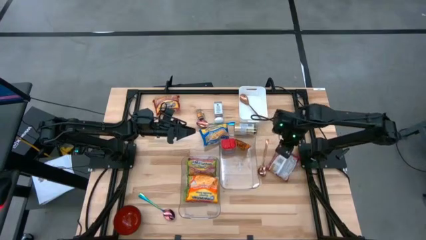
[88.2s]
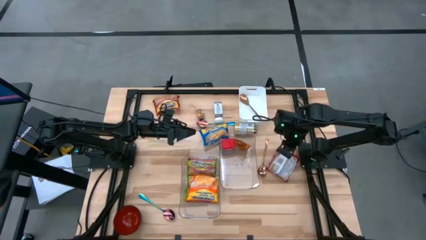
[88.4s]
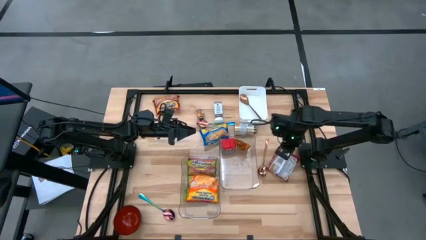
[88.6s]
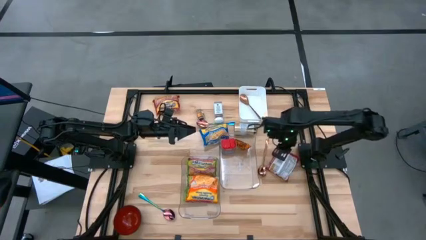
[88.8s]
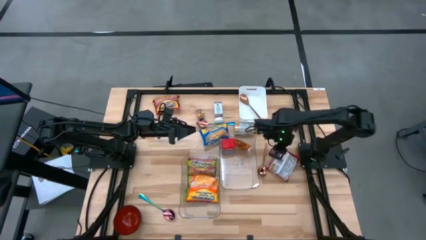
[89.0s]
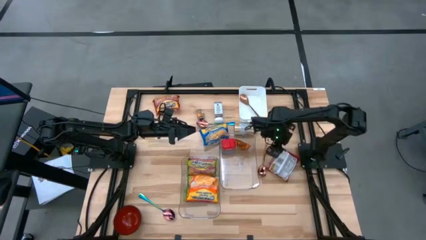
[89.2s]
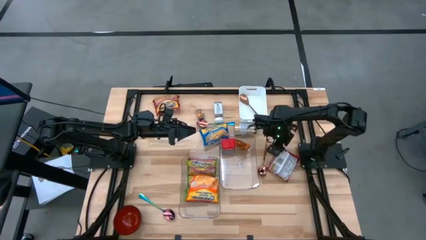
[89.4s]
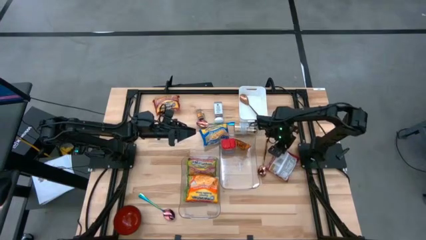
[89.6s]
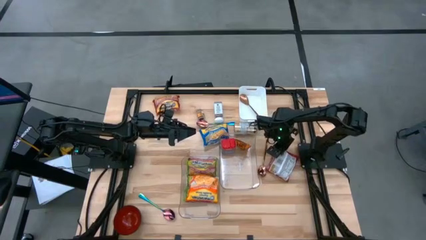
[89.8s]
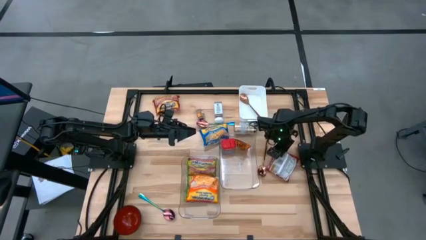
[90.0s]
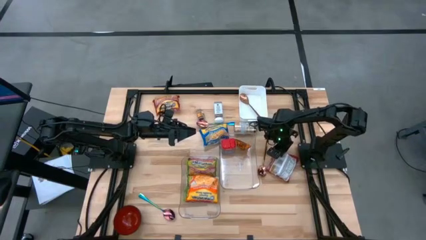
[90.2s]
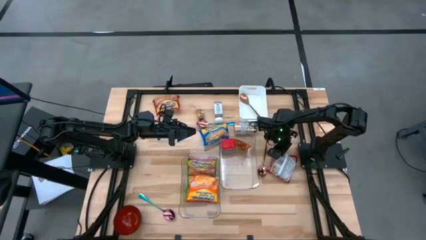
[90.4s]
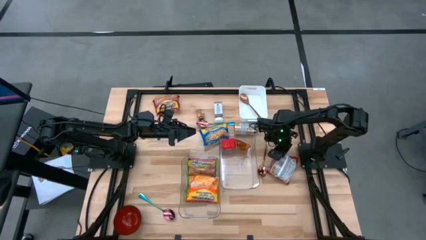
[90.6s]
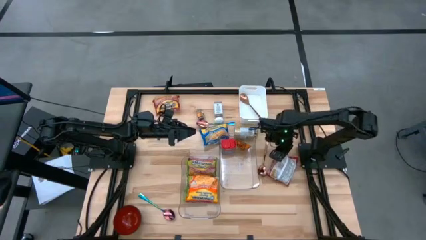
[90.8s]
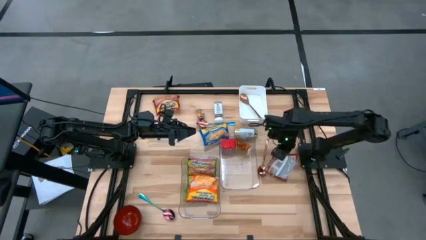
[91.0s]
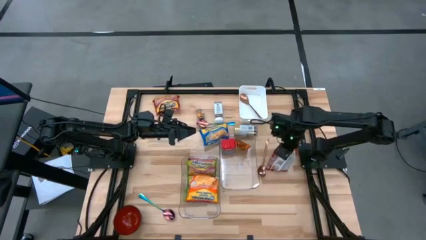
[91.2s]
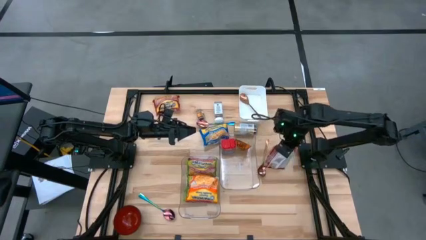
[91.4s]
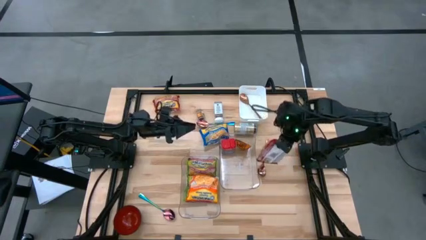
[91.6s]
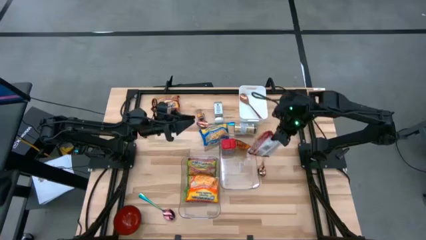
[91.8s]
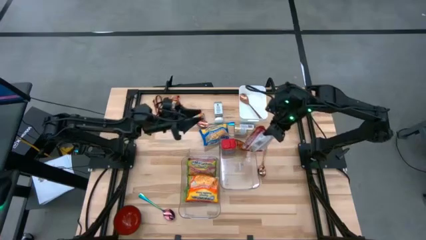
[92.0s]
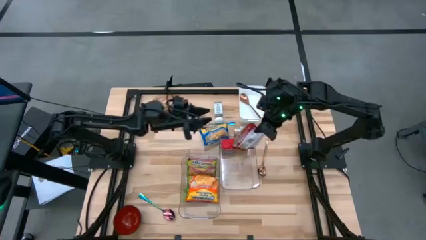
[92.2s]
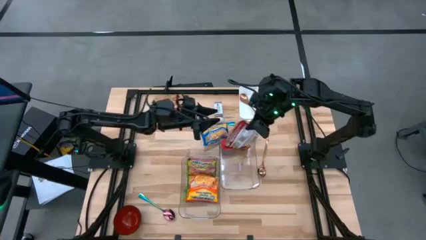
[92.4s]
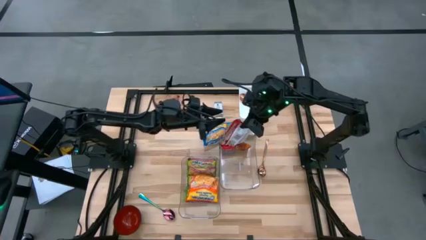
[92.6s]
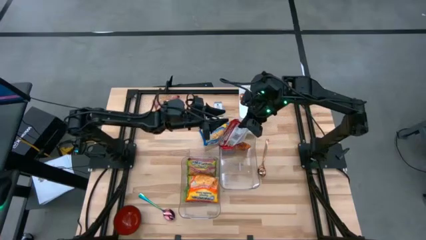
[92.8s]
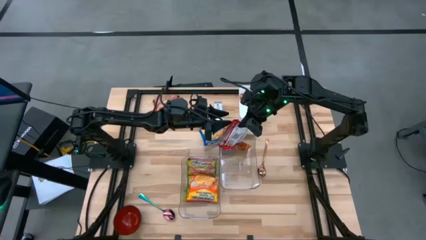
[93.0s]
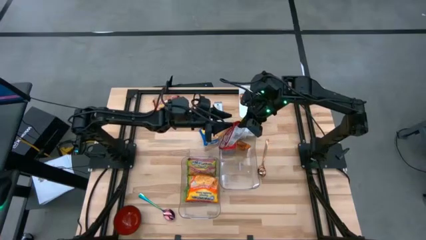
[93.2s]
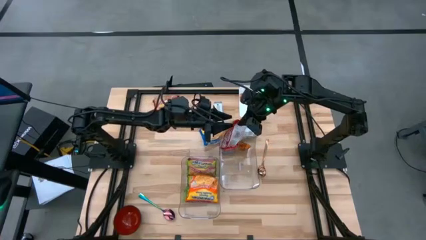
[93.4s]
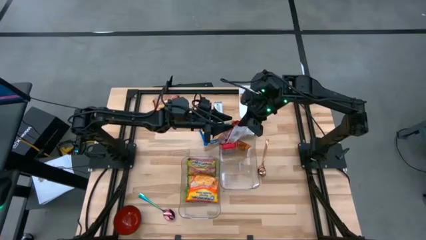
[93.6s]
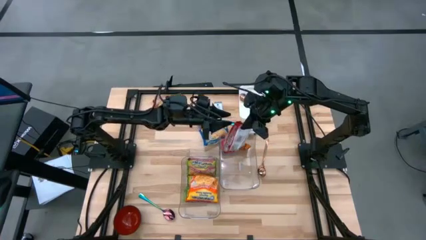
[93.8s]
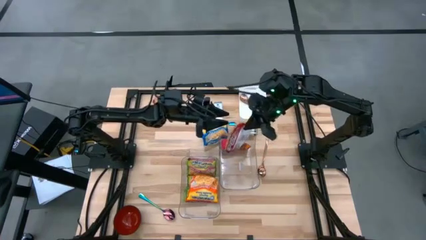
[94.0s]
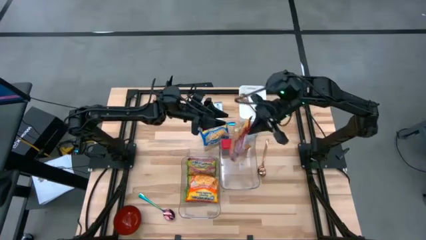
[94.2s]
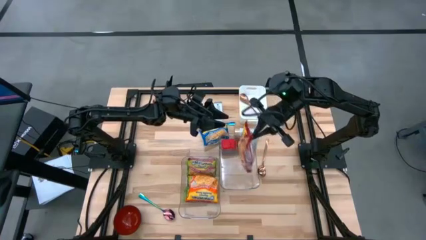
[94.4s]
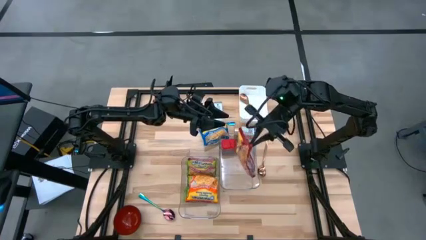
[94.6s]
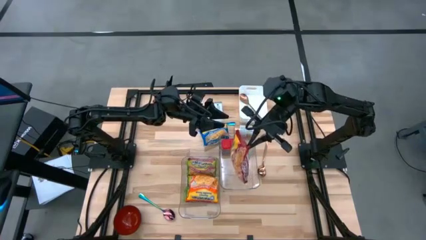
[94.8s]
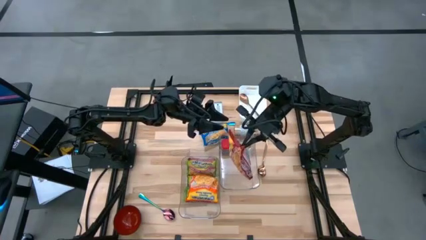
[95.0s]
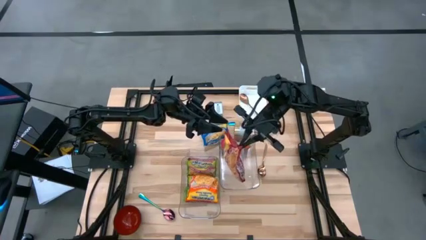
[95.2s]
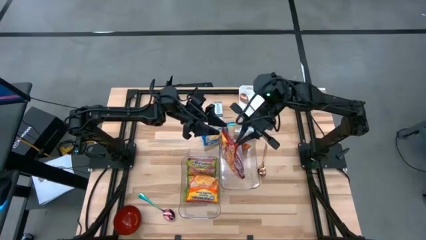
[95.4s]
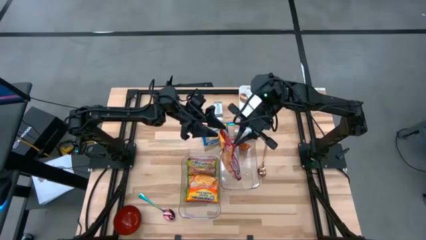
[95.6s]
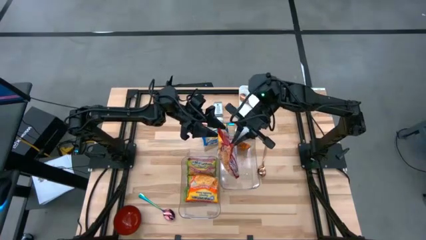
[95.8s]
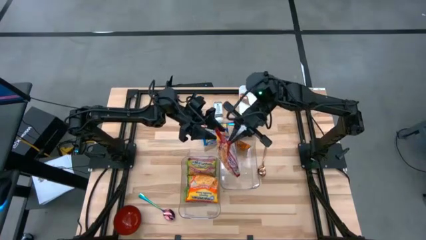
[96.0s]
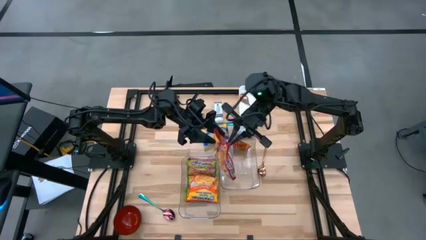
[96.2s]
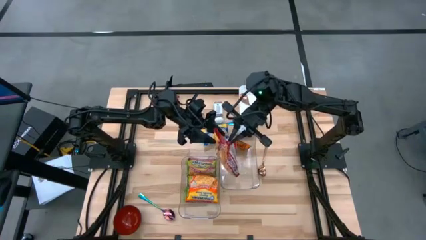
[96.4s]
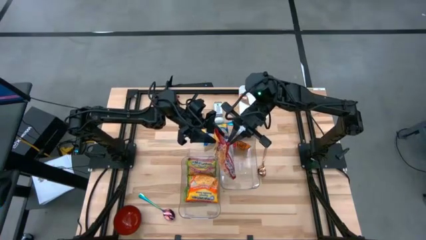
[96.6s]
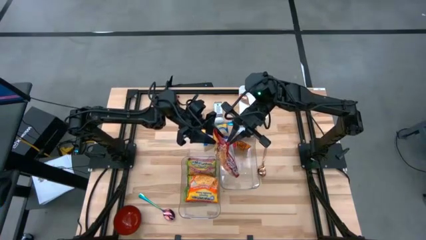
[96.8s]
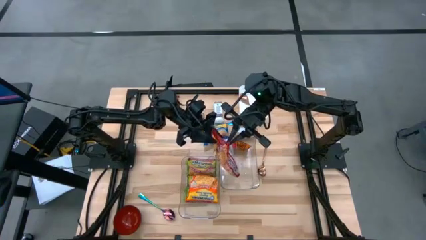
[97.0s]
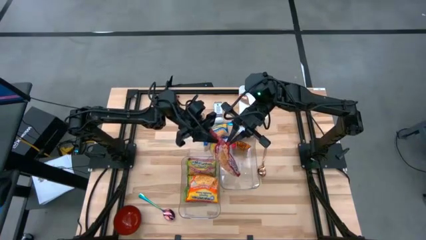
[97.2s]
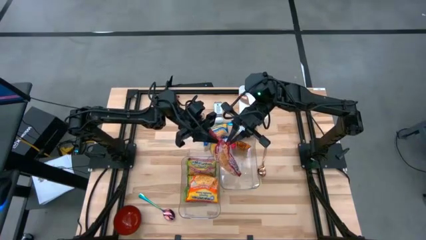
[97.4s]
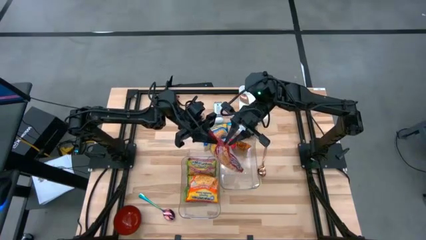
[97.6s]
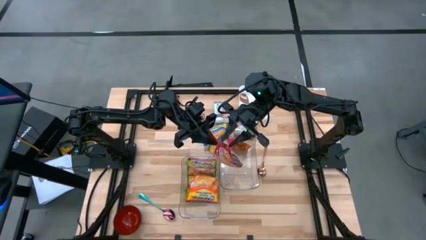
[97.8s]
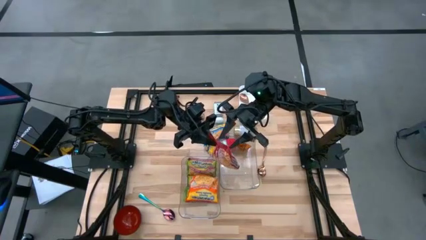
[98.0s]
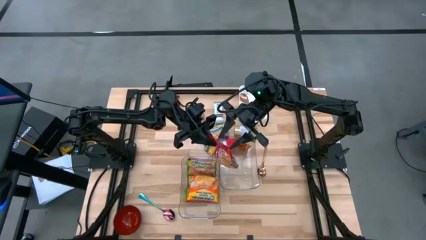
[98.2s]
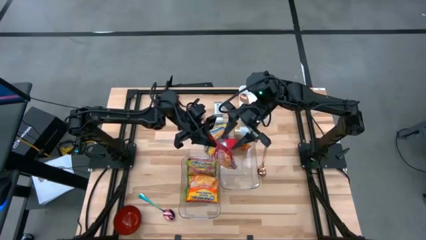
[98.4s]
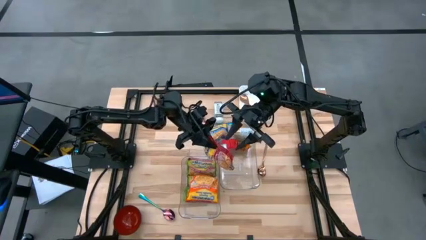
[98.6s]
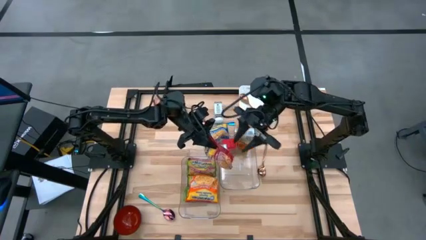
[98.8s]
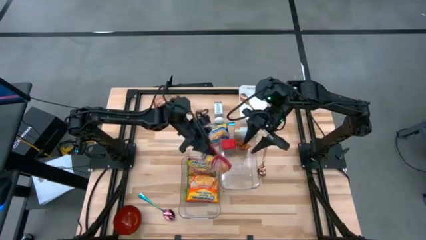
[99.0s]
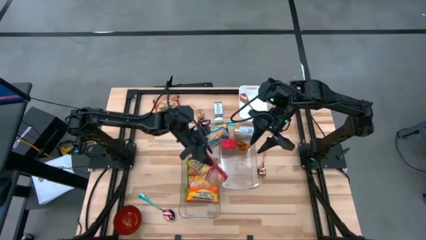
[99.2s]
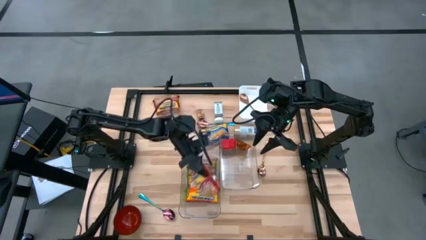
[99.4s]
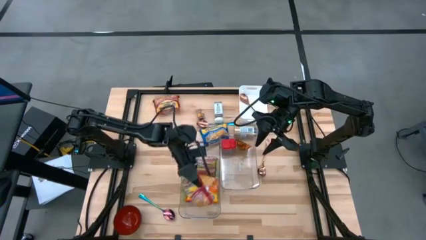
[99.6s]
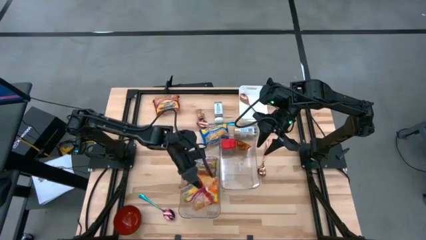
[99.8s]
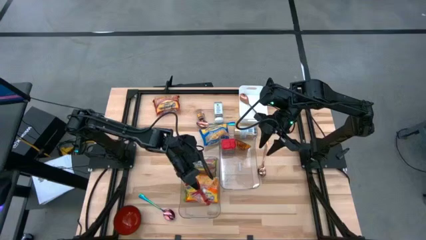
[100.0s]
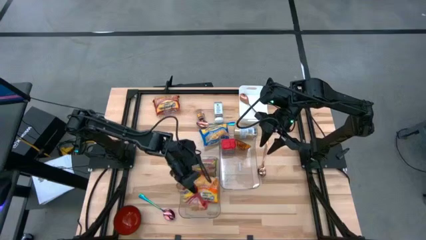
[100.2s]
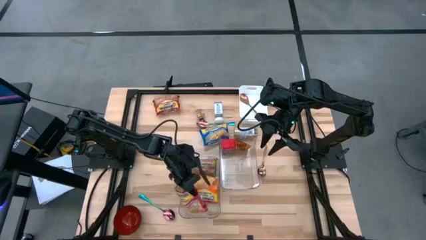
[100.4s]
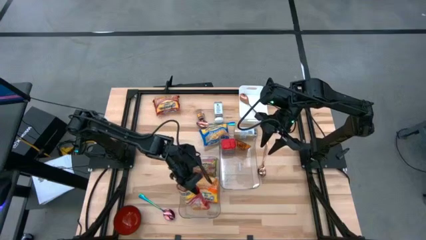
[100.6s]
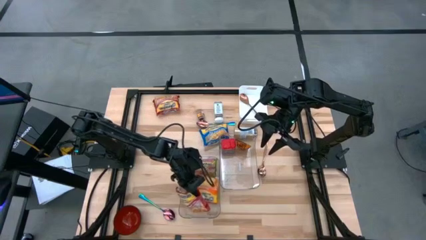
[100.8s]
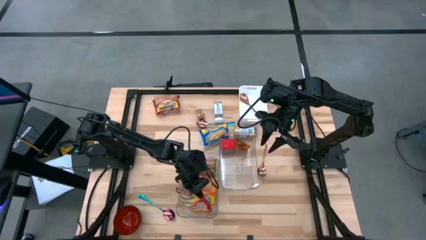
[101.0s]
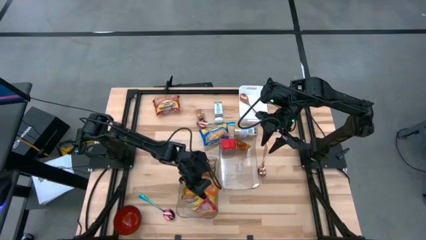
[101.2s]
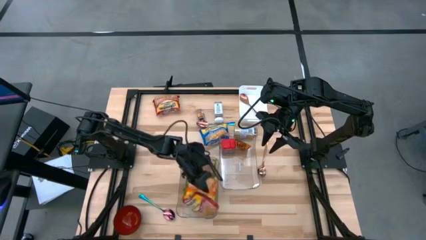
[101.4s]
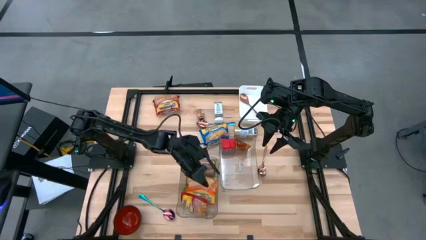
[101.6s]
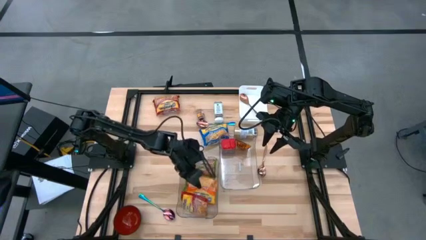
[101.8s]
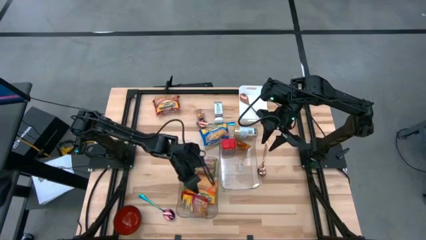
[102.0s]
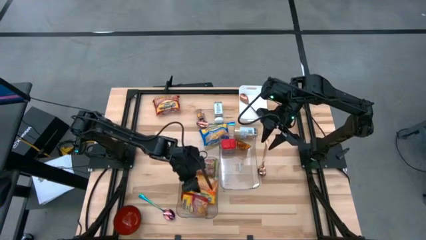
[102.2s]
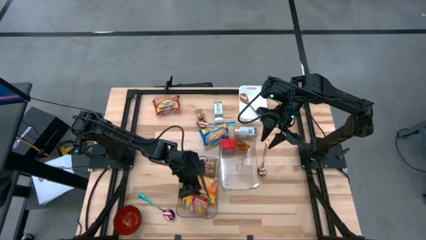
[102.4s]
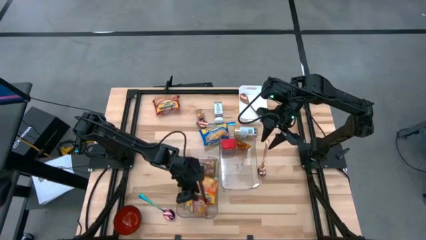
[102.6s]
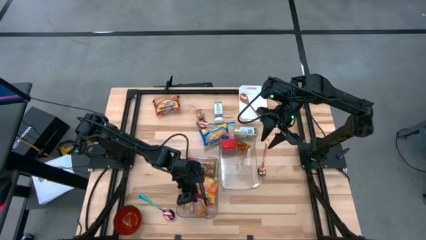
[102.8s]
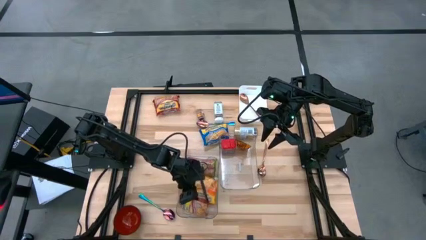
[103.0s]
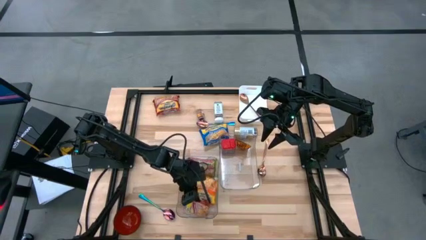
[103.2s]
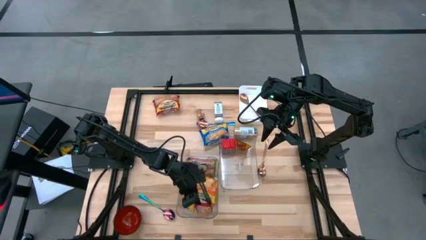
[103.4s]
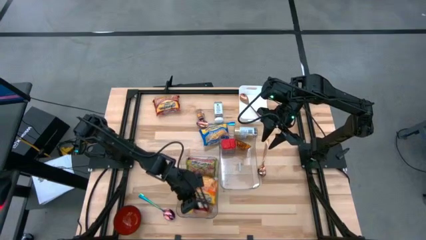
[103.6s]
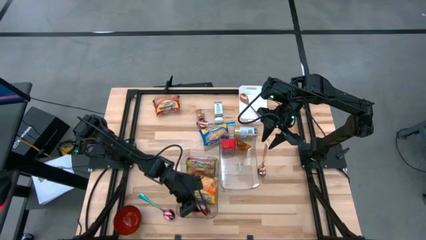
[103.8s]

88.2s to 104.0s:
Task: Pick & Place Food Item
Put the bottom red noodle pack into the left transparent bin
